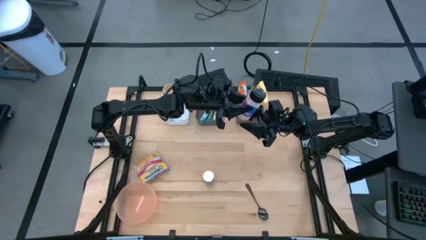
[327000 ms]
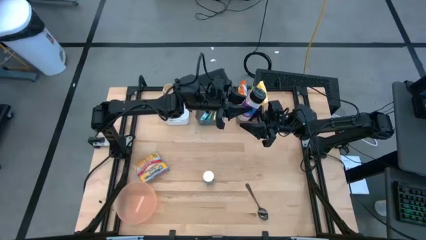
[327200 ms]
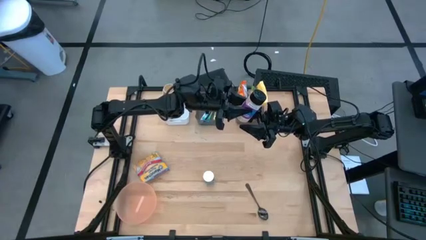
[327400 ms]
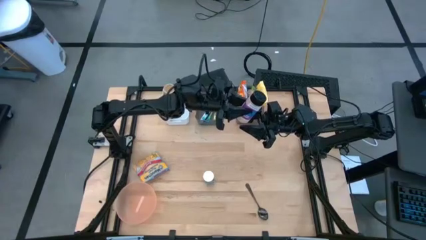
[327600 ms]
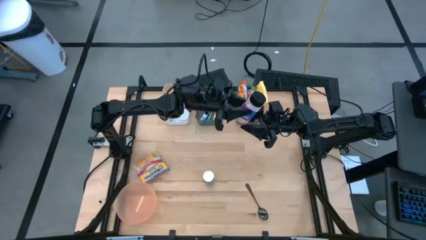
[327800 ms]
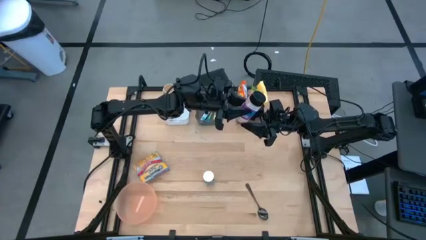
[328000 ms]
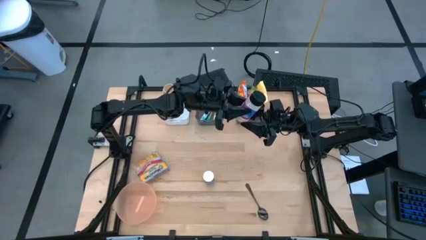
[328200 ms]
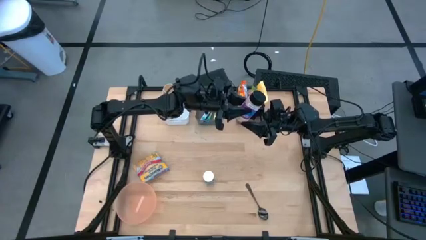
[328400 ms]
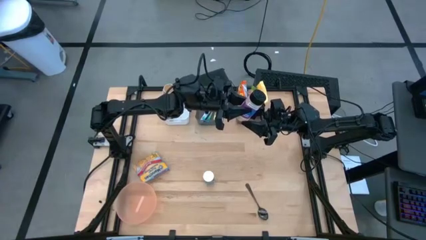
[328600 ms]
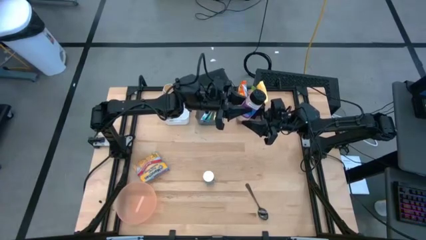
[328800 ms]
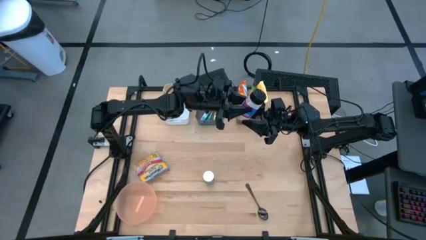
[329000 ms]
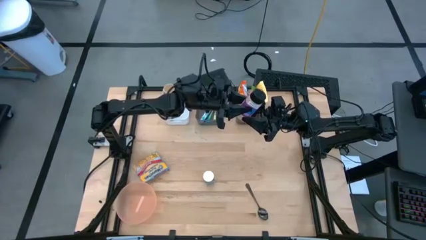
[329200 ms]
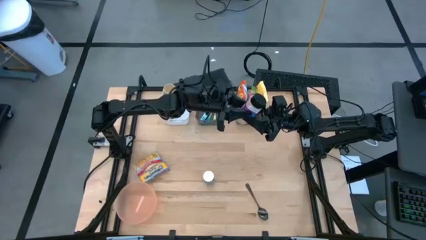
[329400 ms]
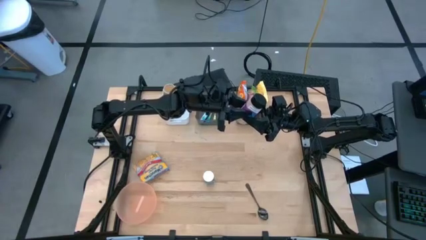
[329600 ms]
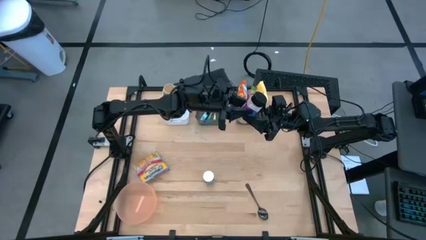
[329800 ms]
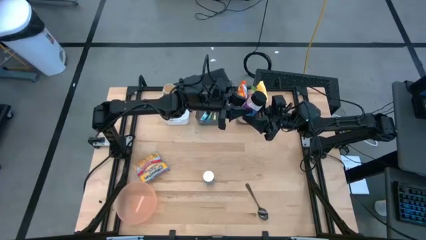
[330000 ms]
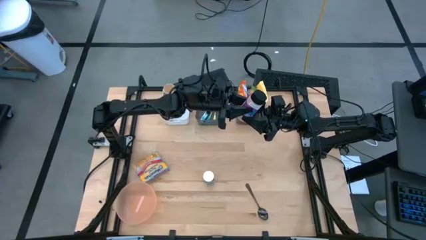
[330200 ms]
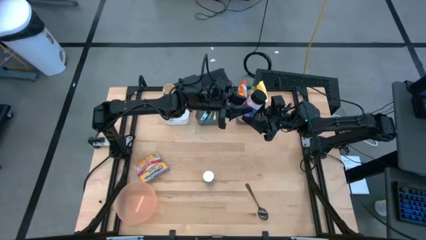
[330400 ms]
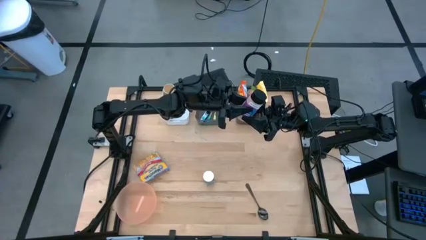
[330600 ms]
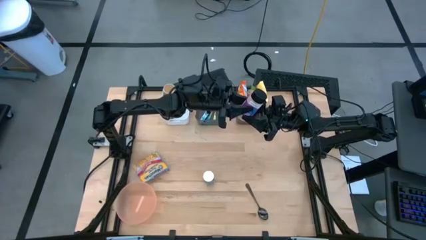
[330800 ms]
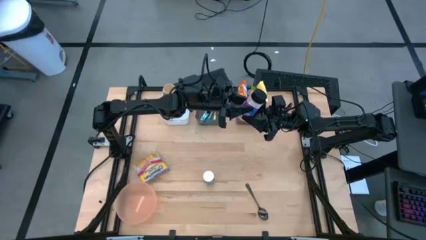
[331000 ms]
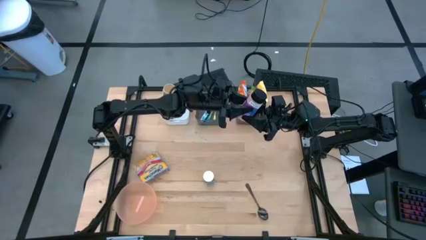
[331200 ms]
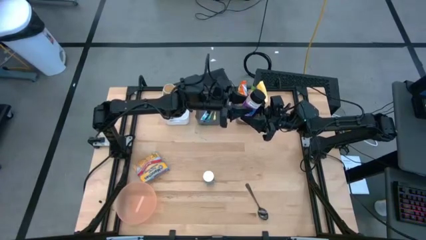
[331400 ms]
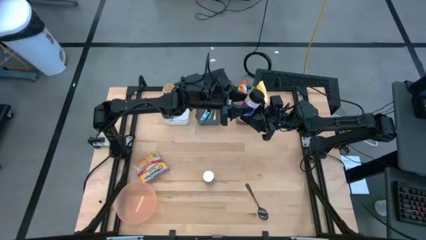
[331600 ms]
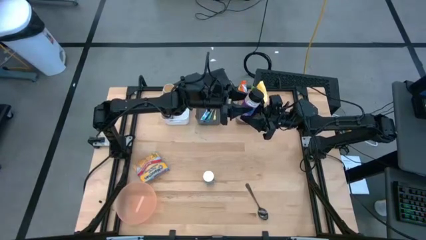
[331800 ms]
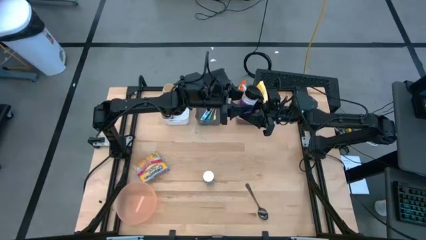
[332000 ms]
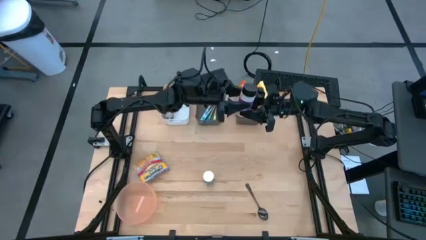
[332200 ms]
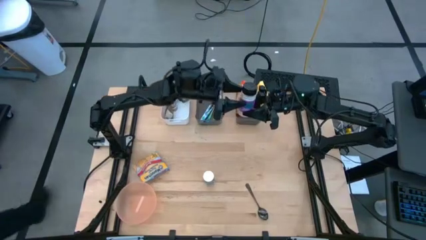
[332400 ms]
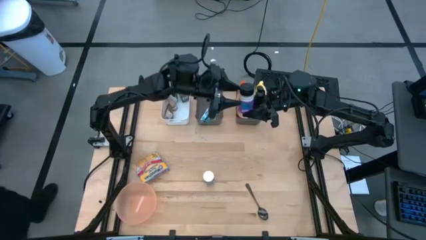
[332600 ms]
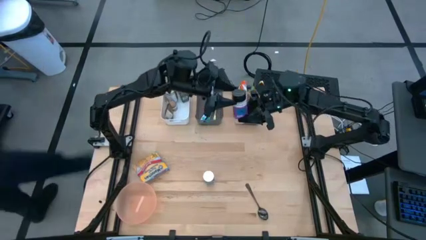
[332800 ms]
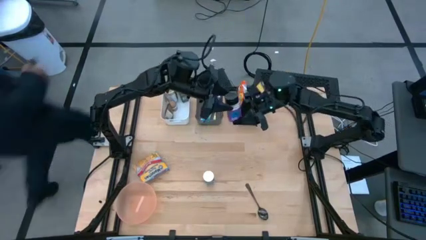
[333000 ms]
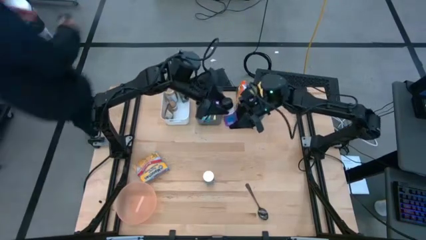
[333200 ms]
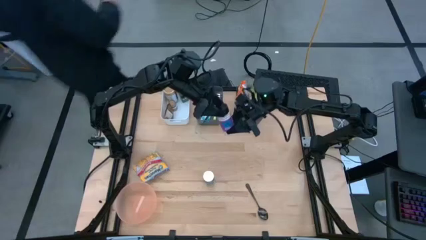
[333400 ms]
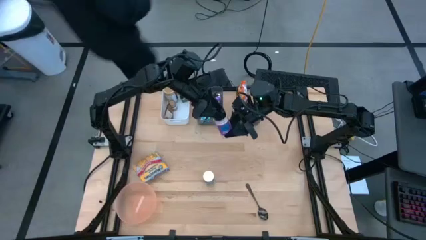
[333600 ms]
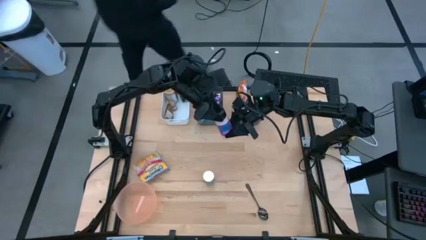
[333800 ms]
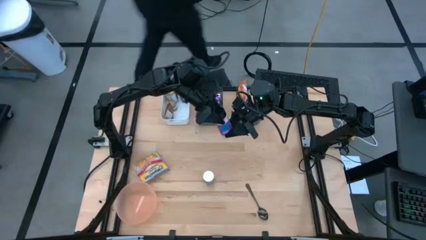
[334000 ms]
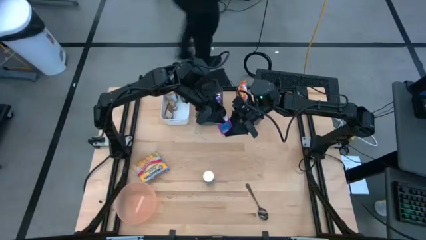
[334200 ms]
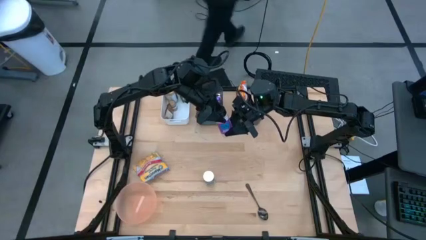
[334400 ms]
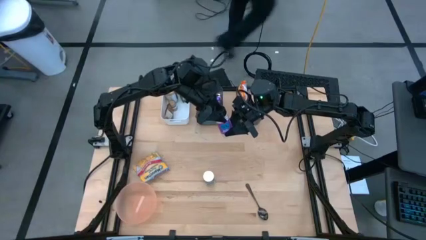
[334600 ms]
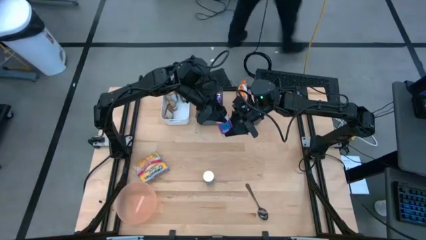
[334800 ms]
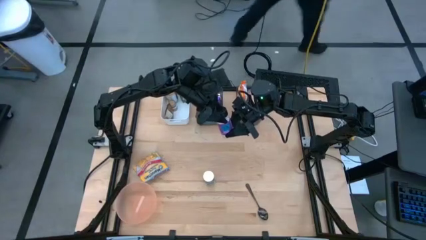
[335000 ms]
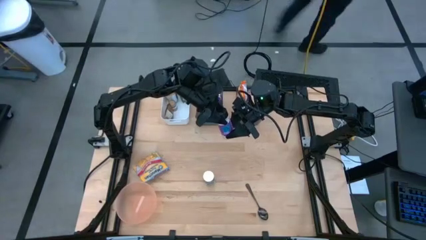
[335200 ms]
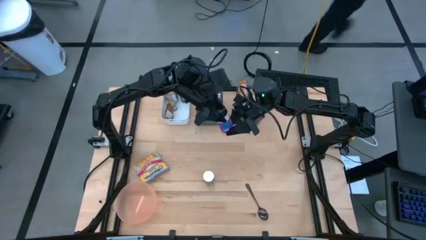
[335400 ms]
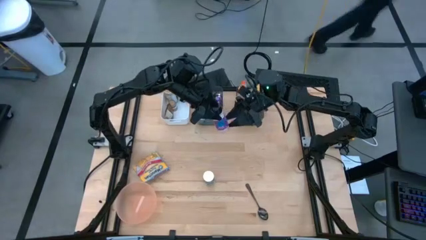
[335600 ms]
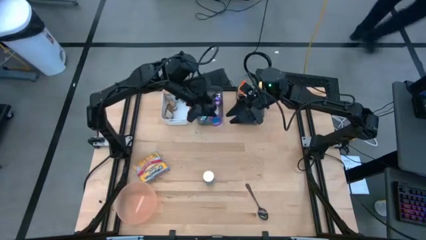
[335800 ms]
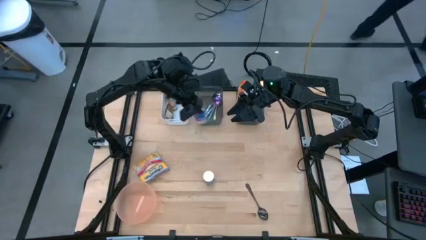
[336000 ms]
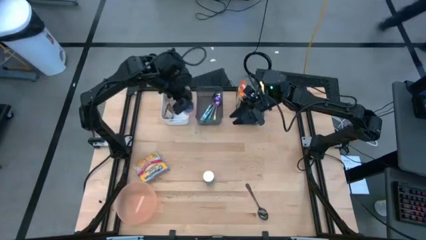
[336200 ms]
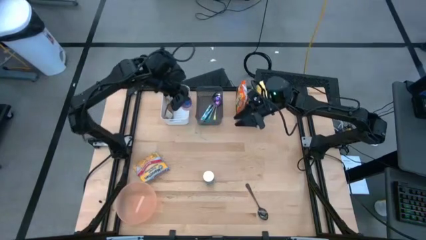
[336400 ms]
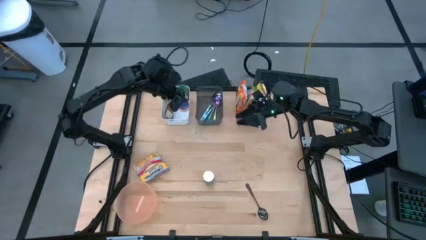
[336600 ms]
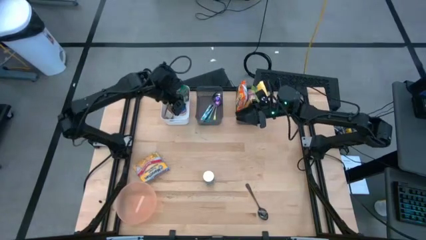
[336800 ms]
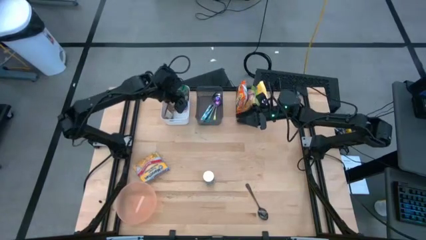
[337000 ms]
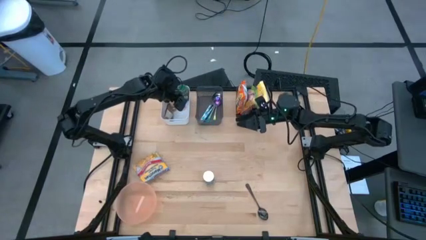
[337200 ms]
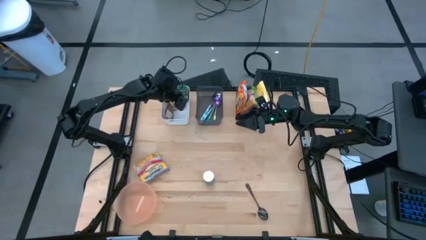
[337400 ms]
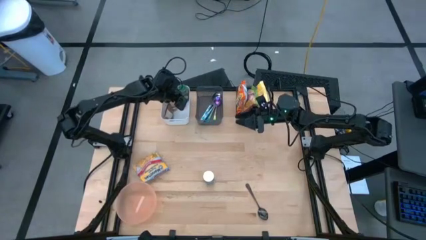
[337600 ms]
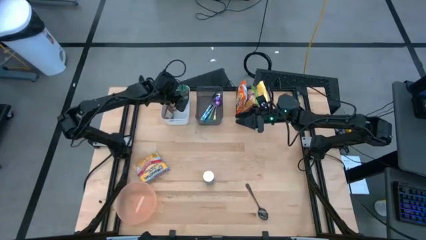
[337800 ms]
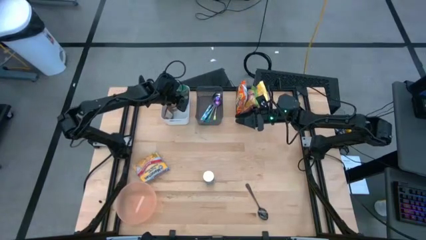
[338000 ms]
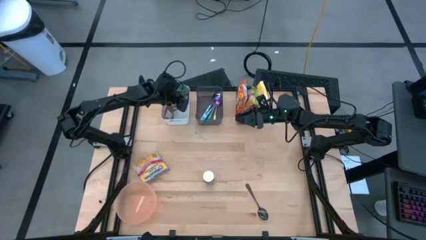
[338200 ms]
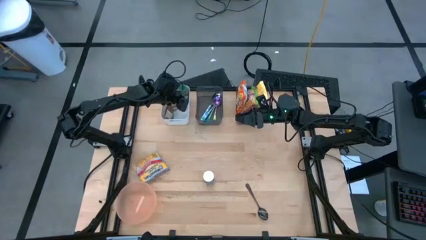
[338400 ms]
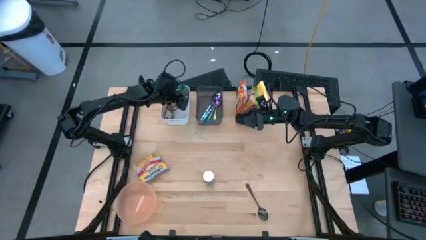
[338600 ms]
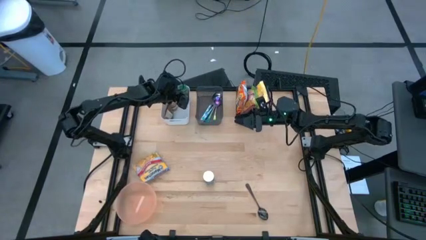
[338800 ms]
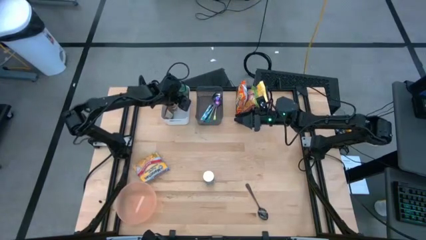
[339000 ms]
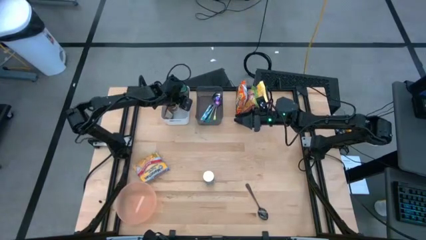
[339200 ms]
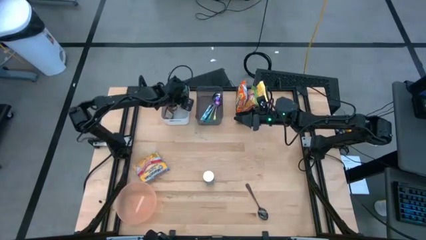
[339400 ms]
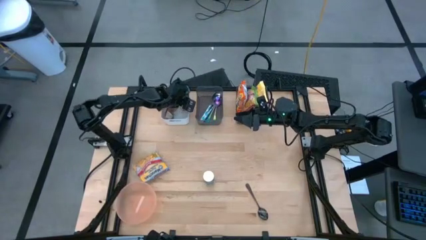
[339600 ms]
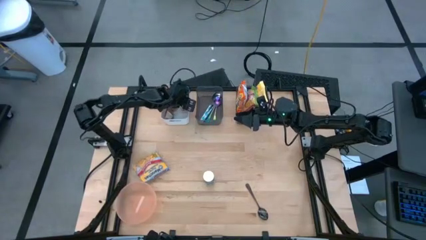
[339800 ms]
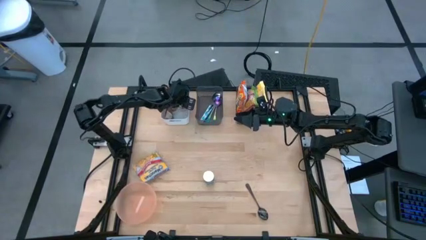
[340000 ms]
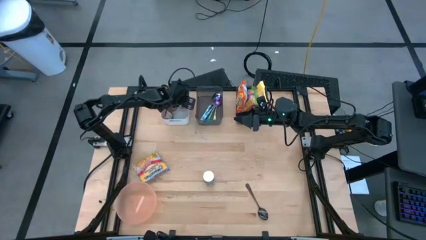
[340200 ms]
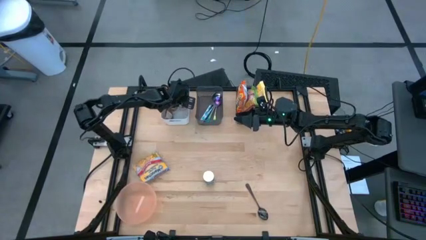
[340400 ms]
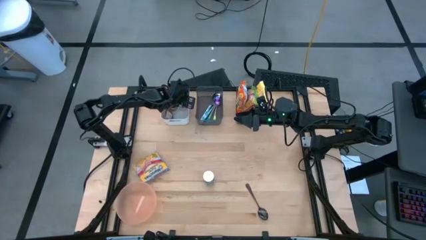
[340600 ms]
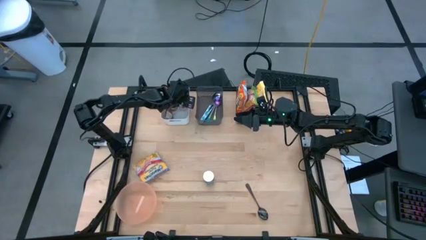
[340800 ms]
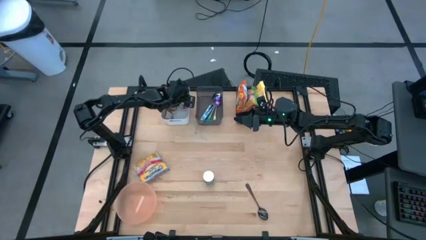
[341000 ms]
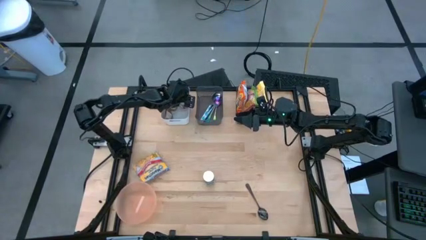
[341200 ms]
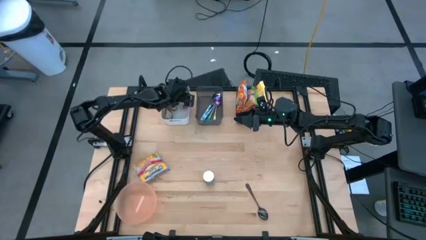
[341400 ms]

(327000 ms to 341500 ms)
Task: Pick & Place Food Item
Put the black seasoning bottle into the white bin
